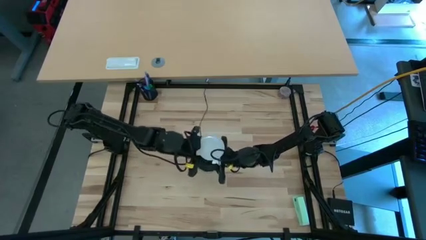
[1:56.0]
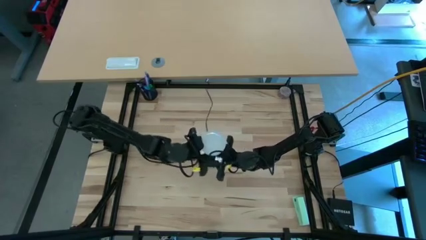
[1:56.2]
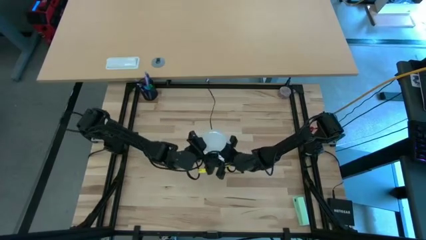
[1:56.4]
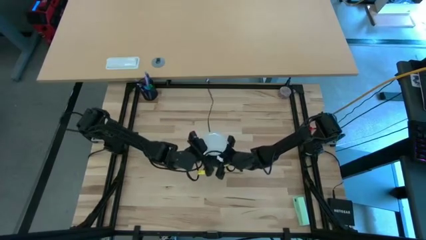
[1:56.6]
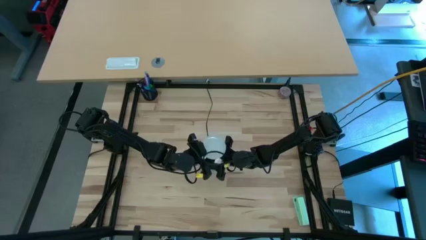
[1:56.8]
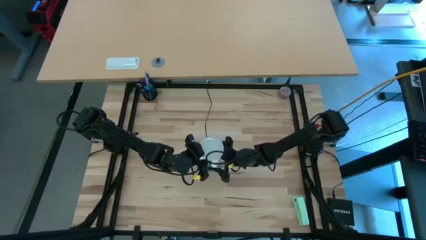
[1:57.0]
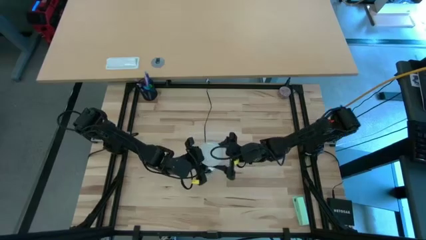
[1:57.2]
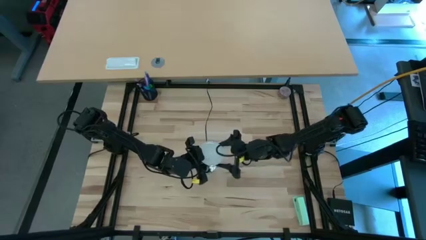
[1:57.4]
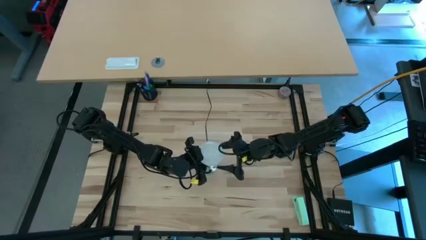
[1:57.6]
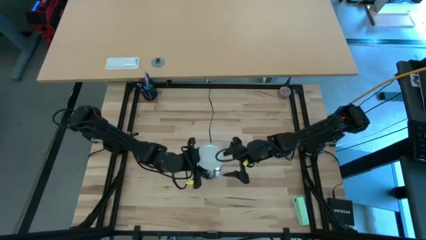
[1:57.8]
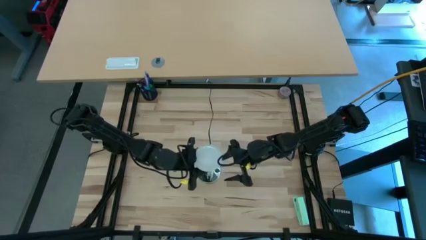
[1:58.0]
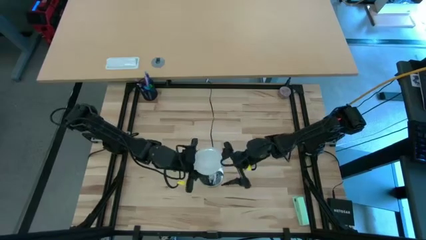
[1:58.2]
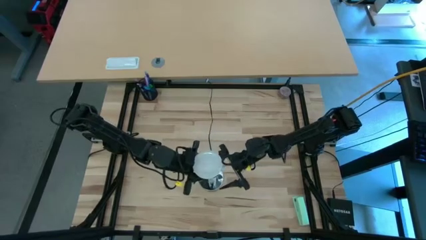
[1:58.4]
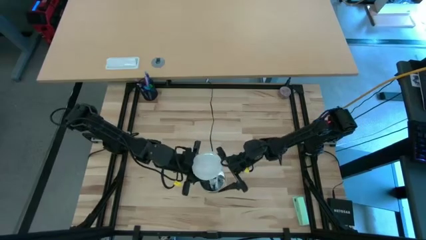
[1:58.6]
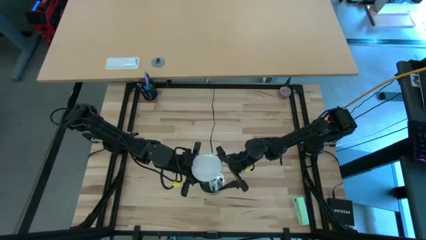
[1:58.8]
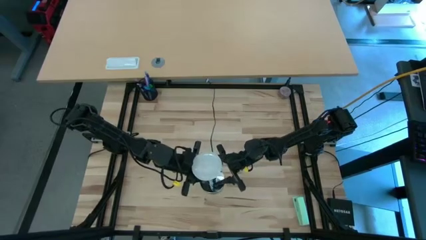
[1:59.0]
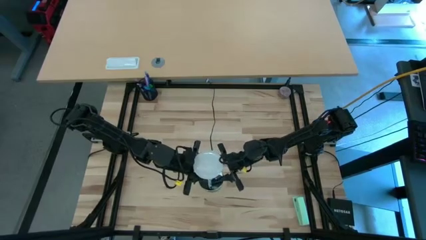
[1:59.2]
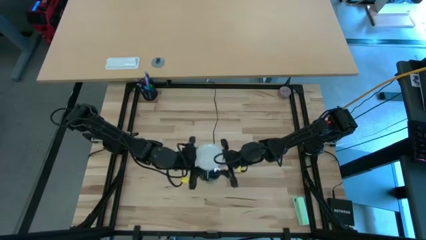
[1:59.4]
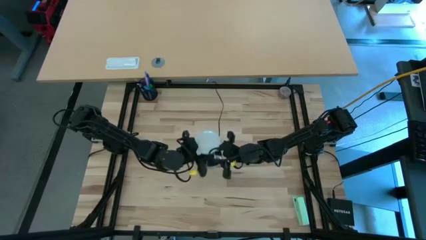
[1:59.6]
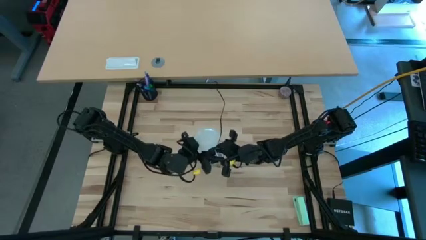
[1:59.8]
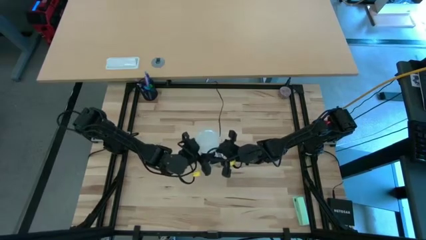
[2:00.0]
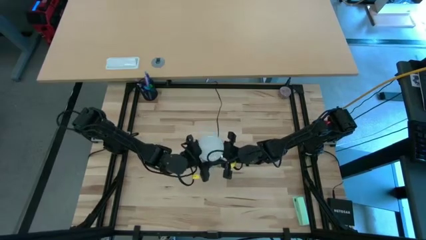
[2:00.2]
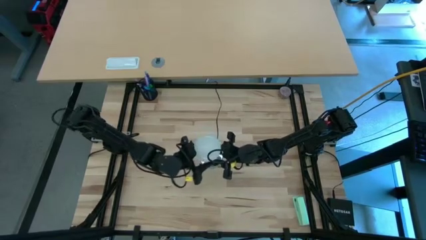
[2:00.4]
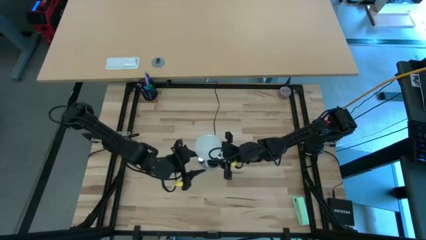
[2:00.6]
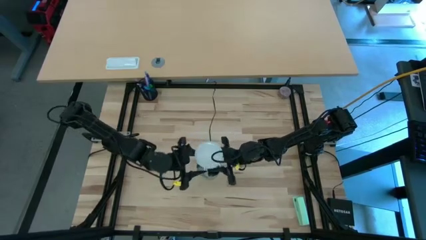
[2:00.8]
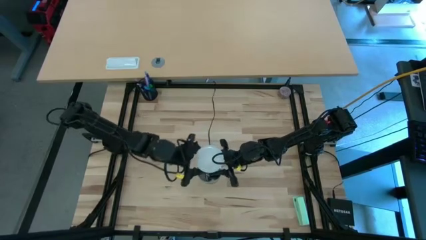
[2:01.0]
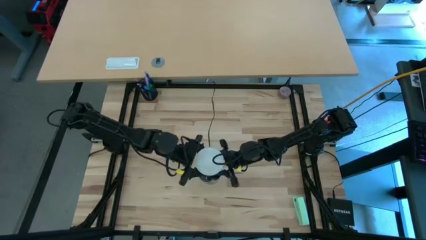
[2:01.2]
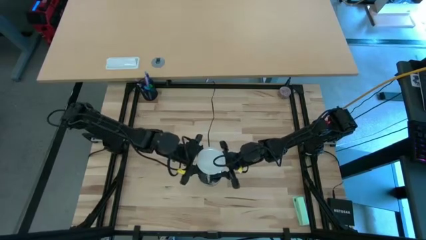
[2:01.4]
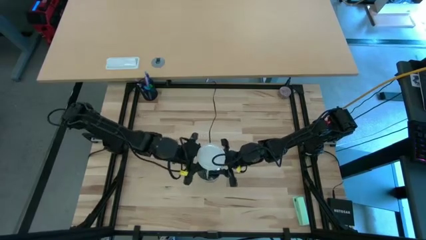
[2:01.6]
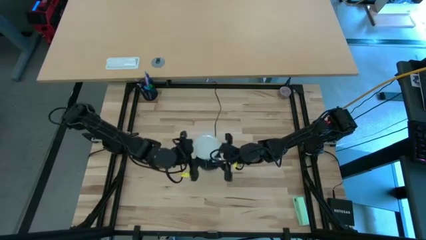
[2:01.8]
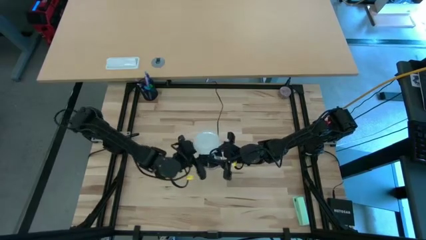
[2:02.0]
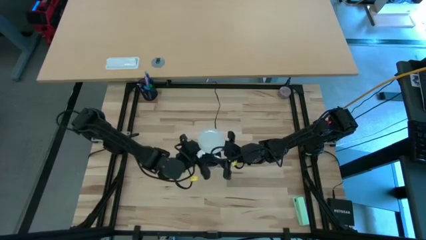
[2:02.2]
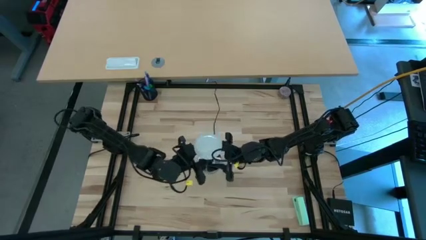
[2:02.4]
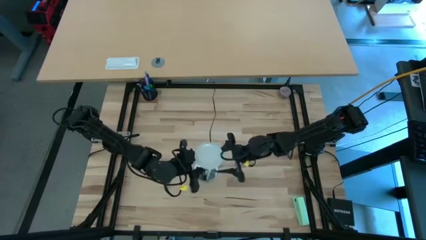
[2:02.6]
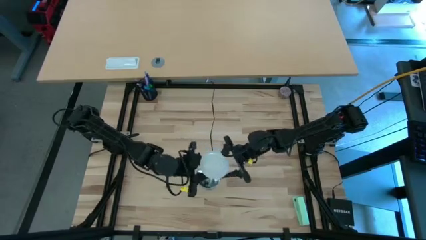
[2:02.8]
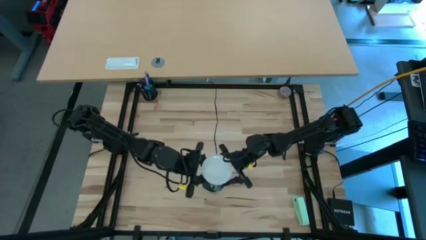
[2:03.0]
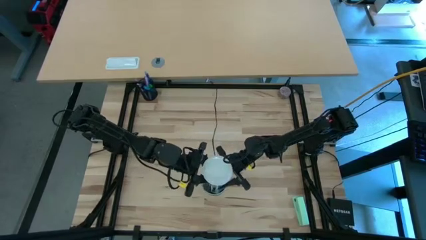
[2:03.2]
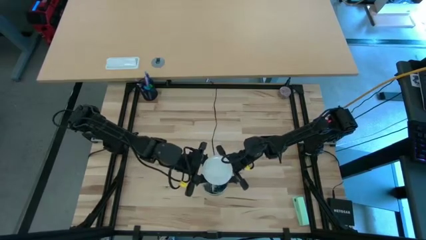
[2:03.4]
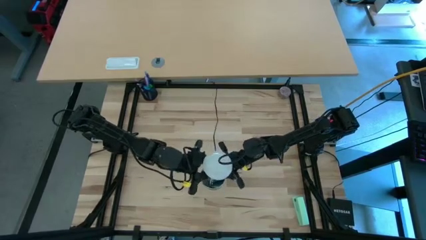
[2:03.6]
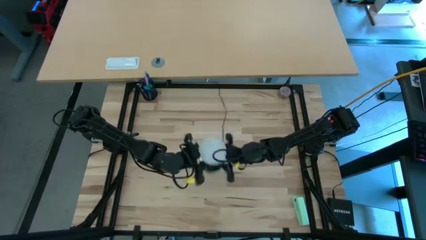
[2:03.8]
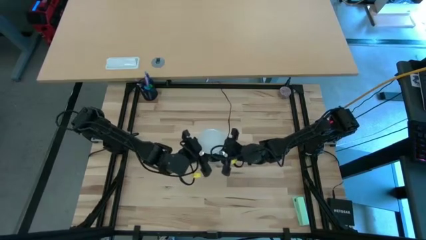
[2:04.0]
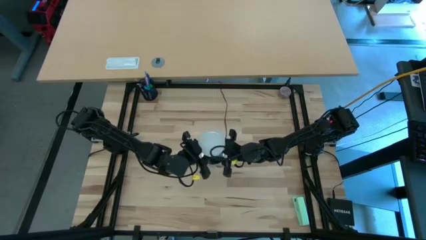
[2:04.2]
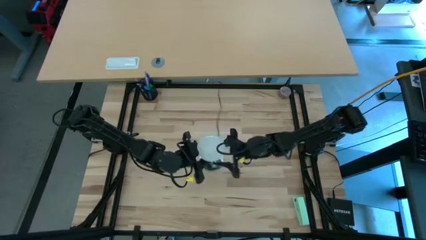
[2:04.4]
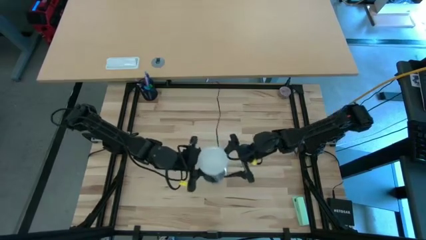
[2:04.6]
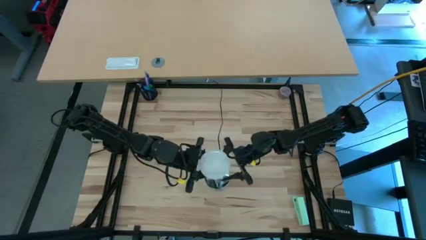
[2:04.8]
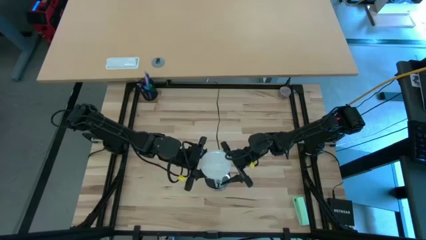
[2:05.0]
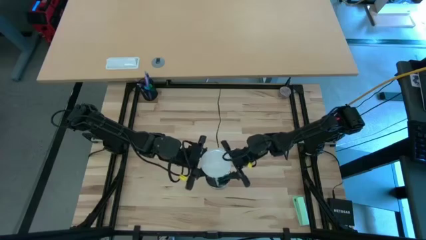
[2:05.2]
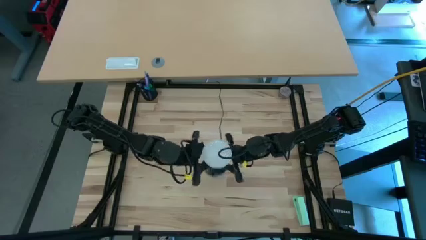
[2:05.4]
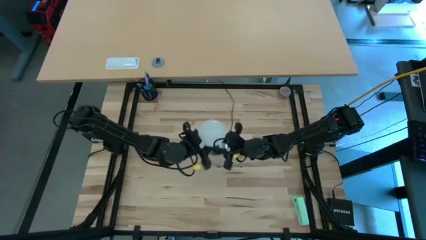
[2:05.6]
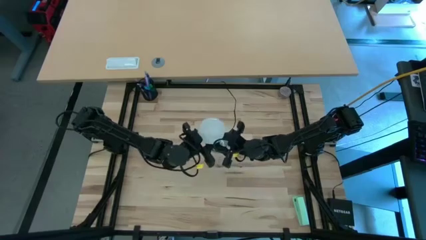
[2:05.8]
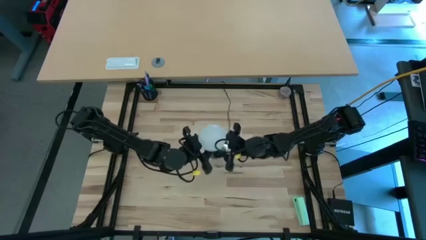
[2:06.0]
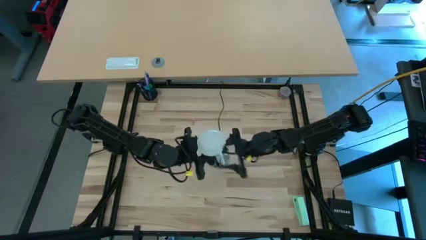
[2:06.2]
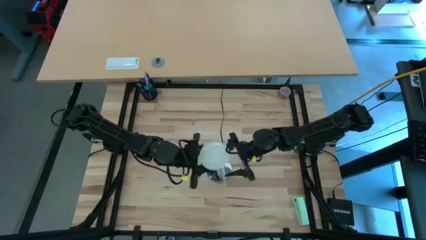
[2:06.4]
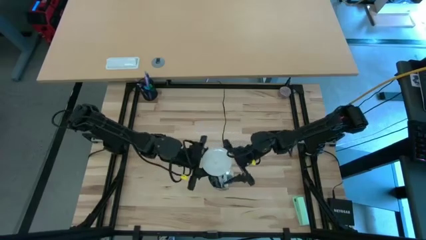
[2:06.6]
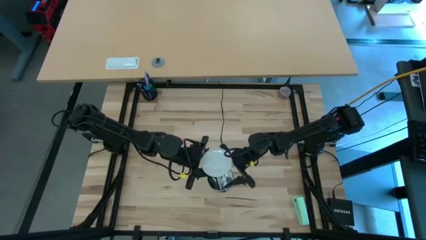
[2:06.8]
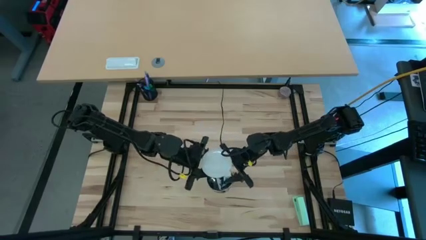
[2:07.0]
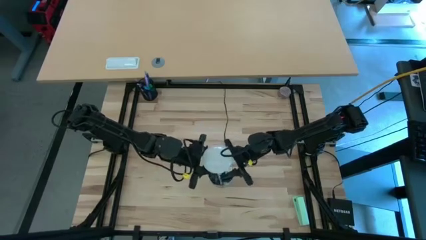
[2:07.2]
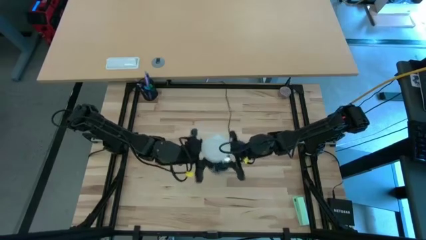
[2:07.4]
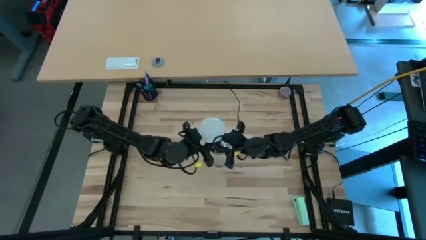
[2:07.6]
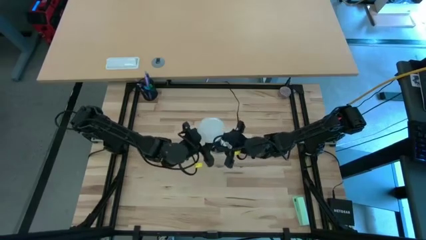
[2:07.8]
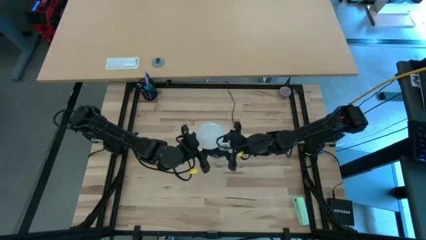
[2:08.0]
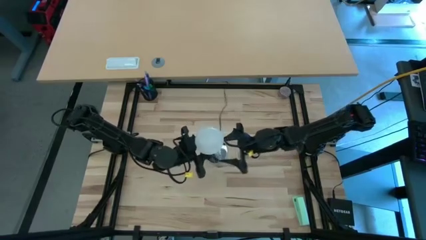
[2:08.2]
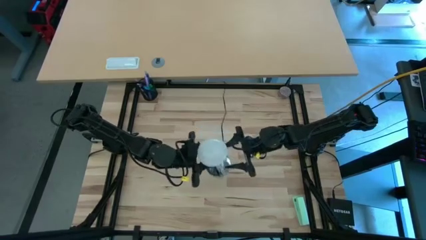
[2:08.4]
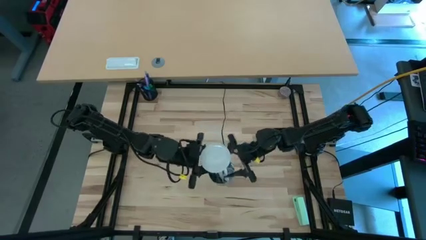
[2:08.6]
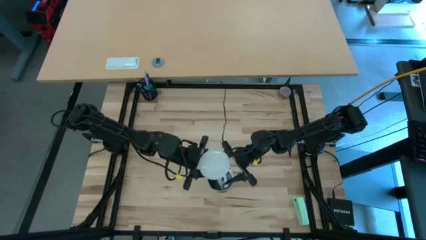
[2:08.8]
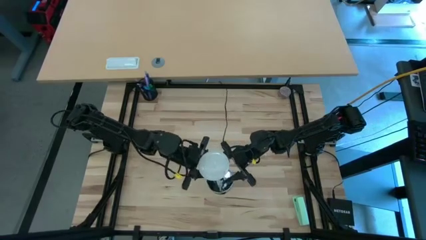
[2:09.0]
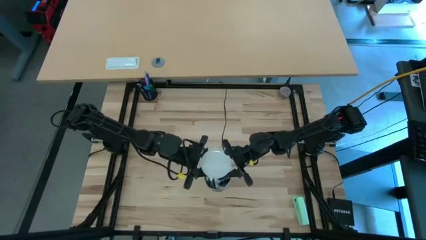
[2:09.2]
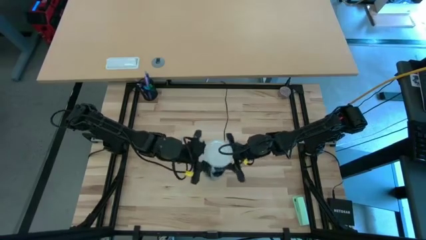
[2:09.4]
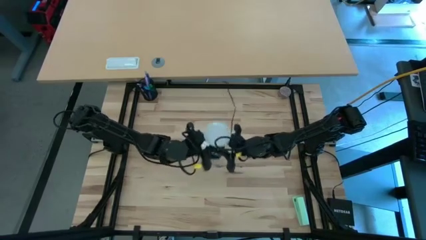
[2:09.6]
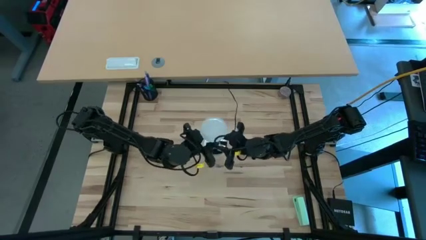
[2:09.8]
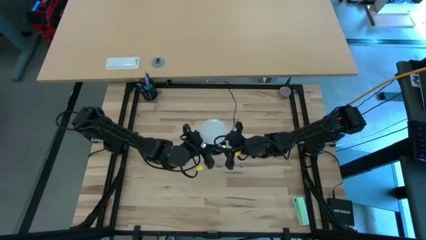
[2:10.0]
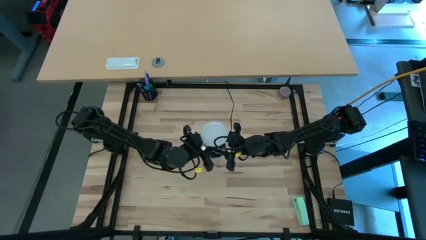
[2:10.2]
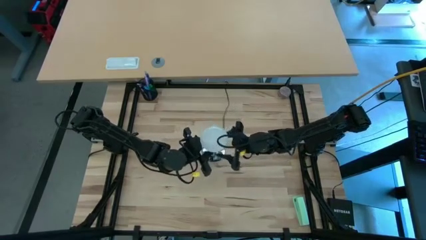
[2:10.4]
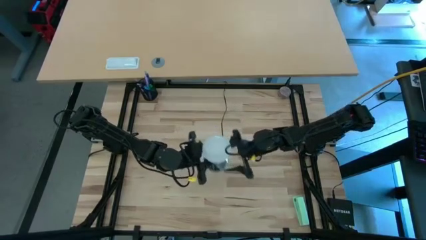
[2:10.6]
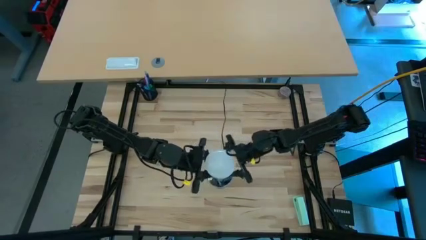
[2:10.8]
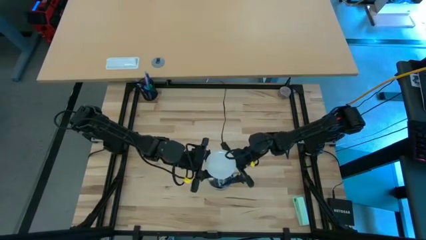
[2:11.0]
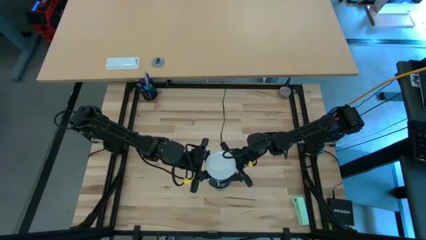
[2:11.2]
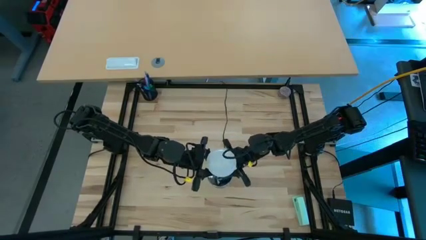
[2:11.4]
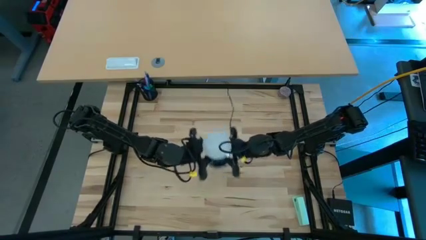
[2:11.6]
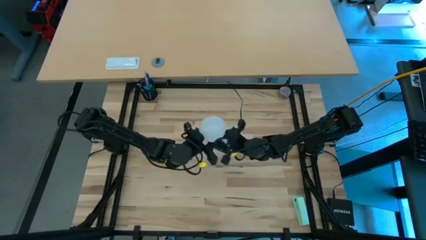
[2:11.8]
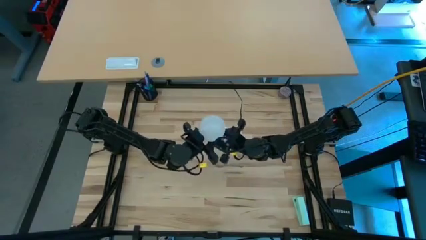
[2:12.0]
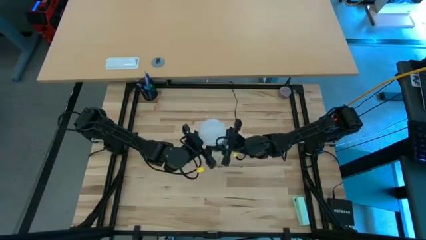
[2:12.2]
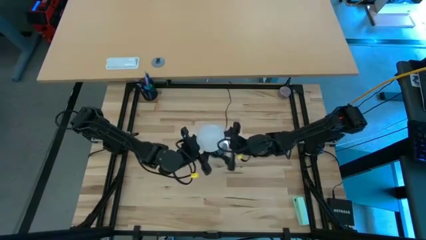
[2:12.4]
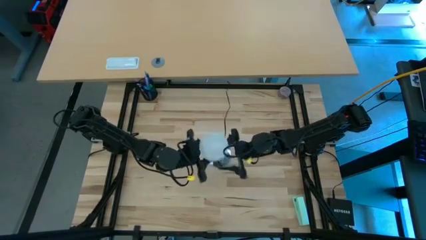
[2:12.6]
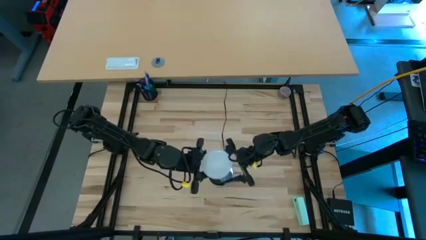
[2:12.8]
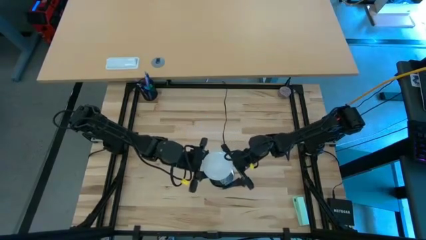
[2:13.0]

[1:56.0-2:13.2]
Task: Screw lightbulb
Remove the lightbulb from the lamp
